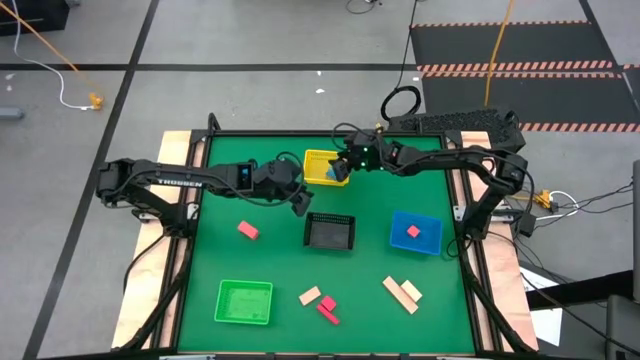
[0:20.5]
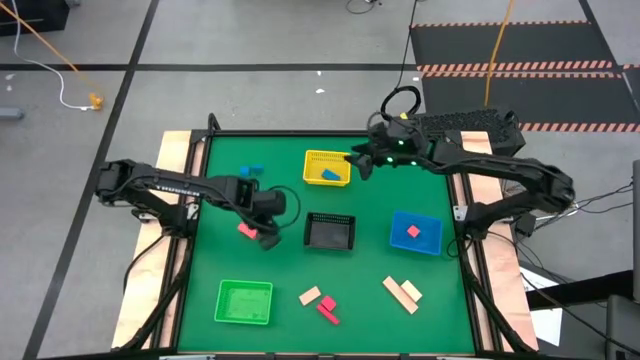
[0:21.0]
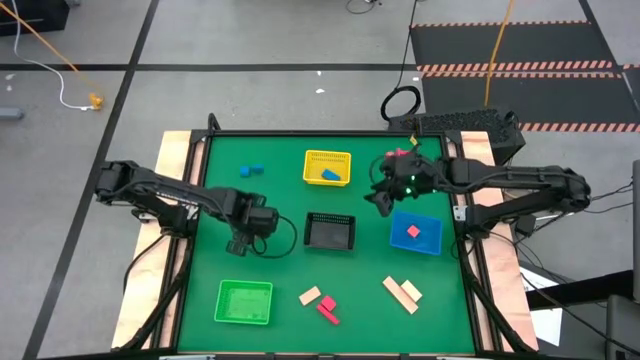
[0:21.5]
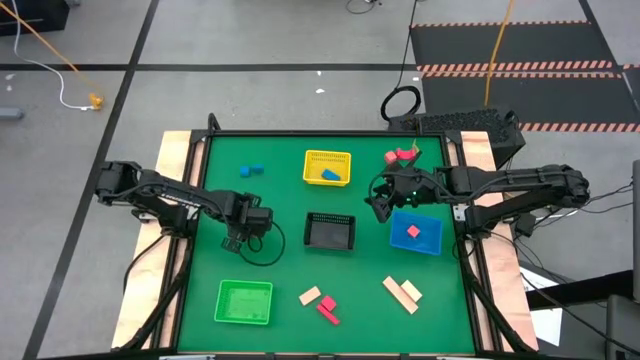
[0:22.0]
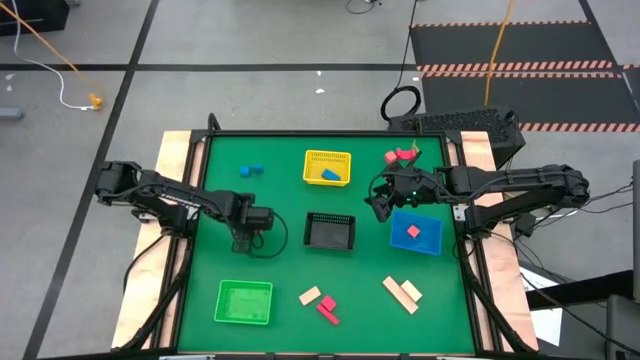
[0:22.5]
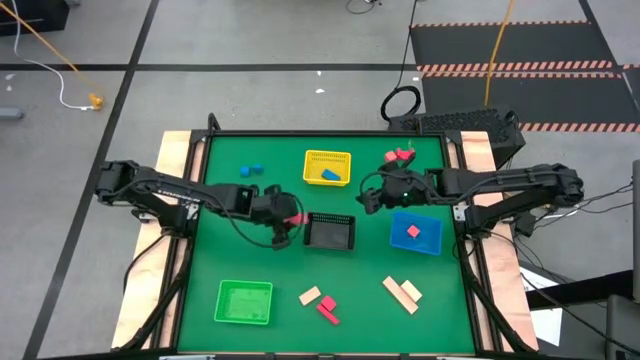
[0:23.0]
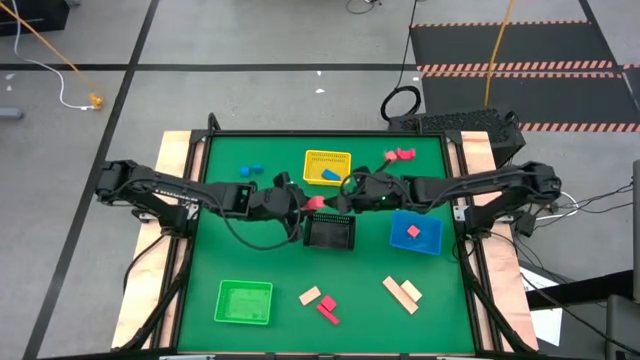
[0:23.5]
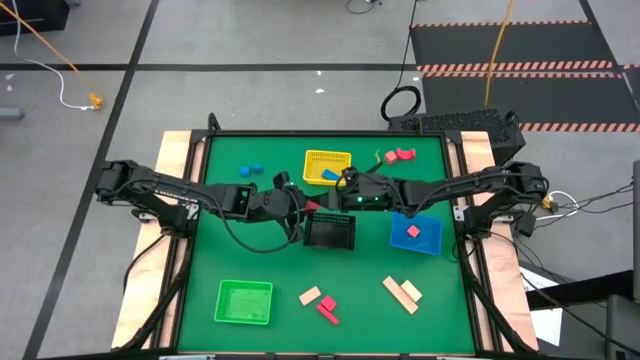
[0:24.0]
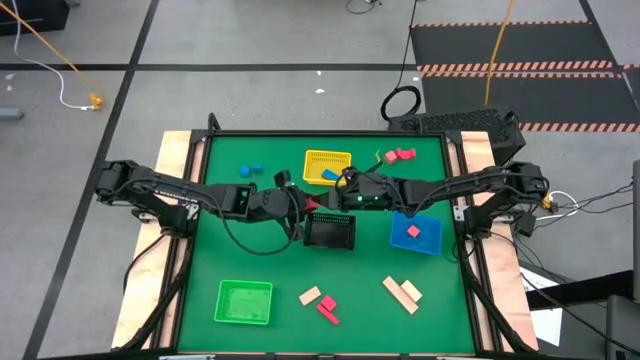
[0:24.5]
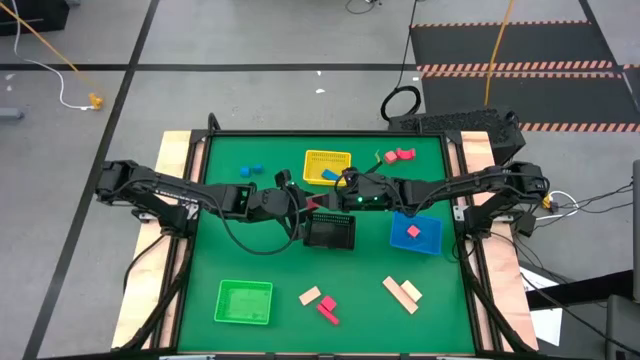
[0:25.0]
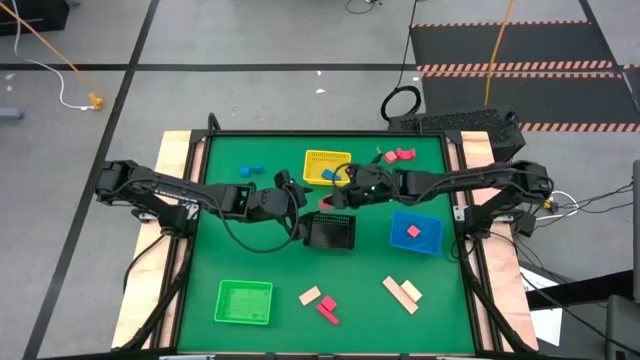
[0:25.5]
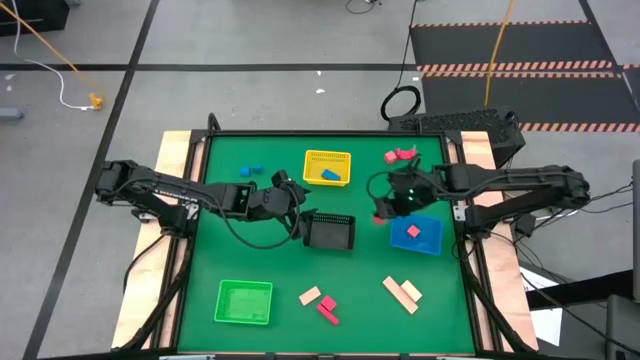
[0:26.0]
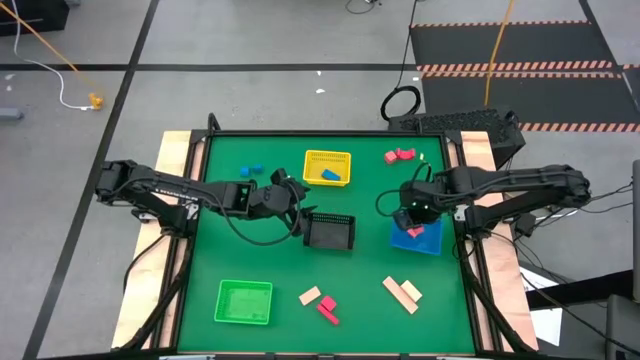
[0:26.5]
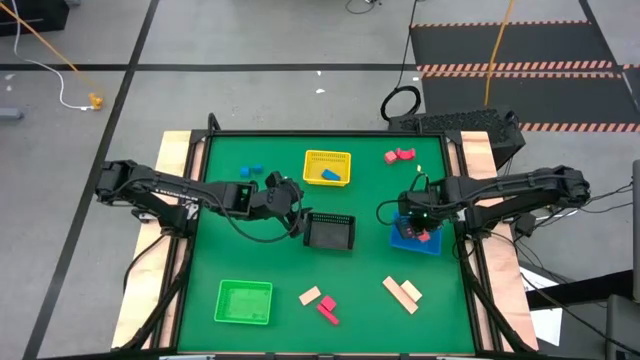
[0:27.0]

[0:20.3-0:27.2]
Task: Sort & place blocks by color
Put the bottom orange block into the blue bin

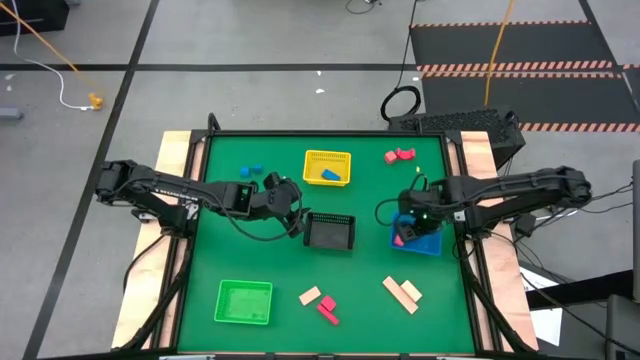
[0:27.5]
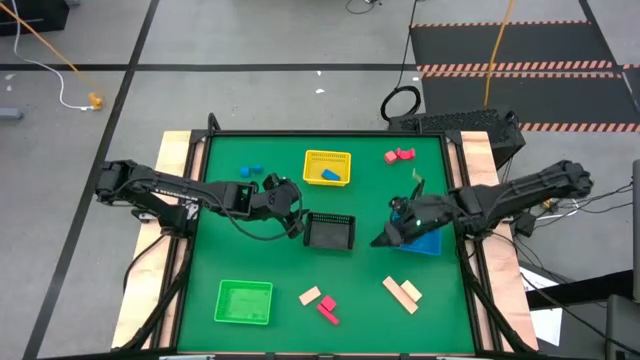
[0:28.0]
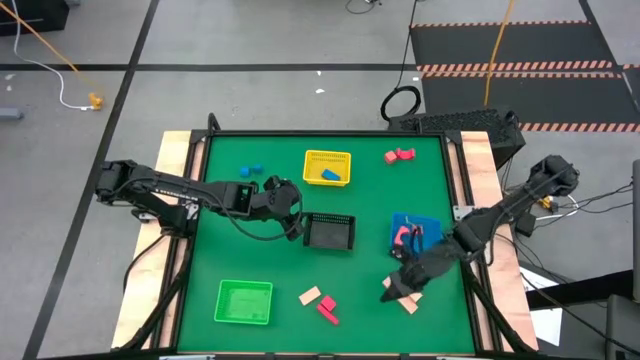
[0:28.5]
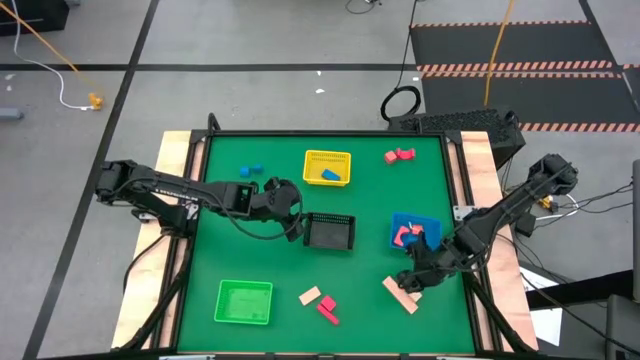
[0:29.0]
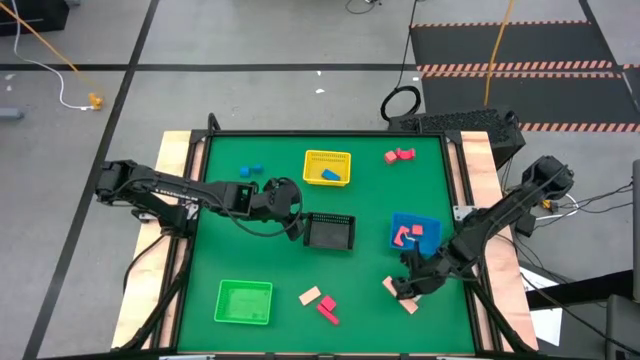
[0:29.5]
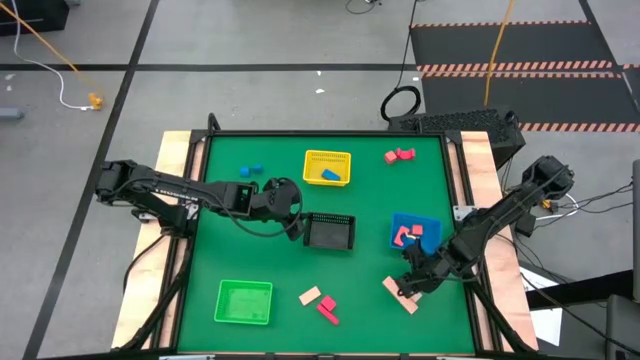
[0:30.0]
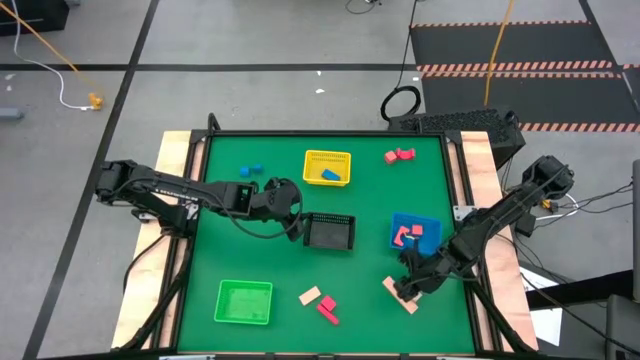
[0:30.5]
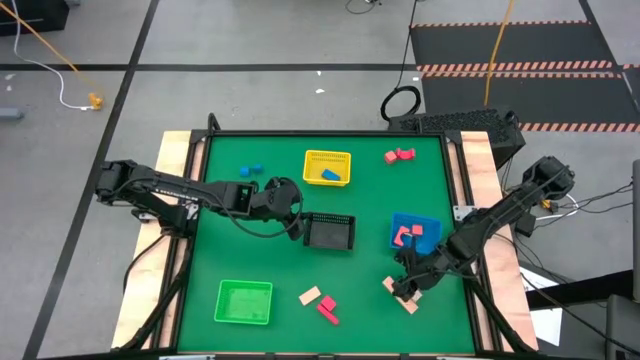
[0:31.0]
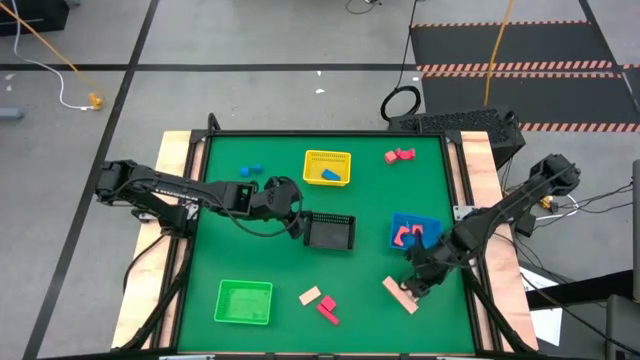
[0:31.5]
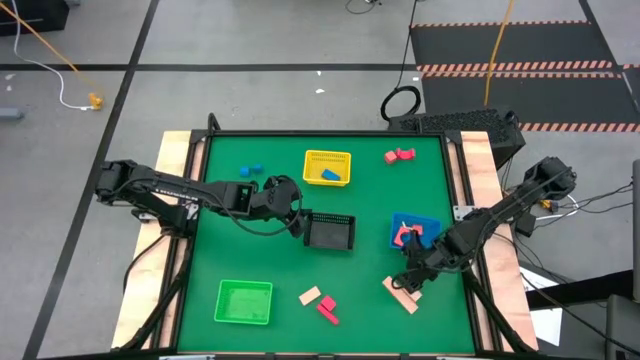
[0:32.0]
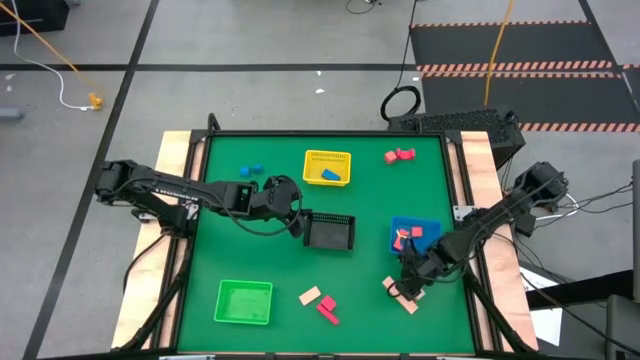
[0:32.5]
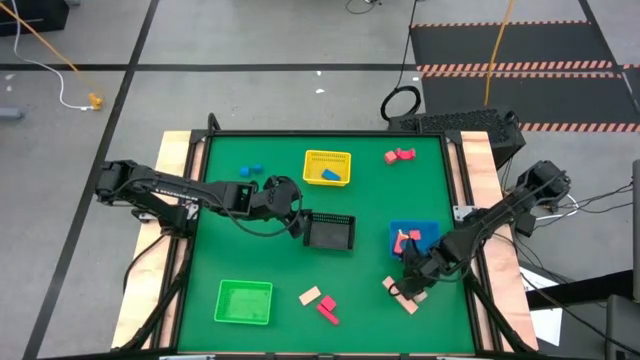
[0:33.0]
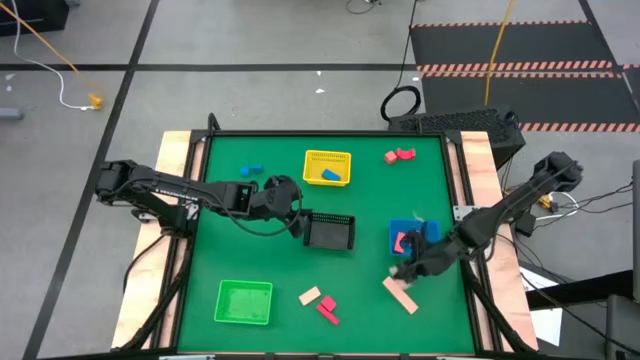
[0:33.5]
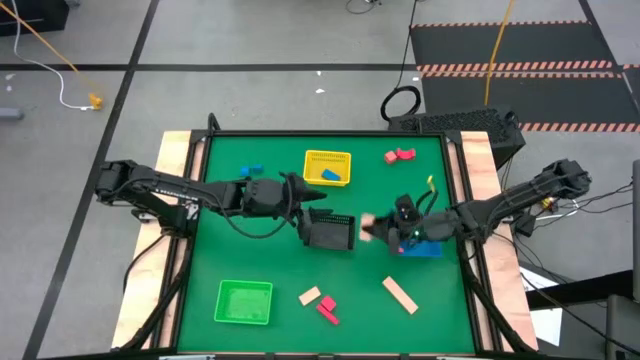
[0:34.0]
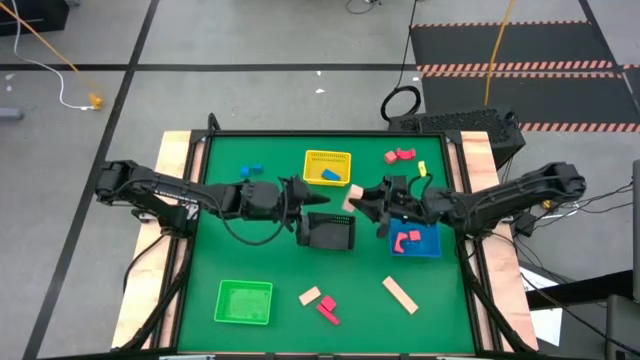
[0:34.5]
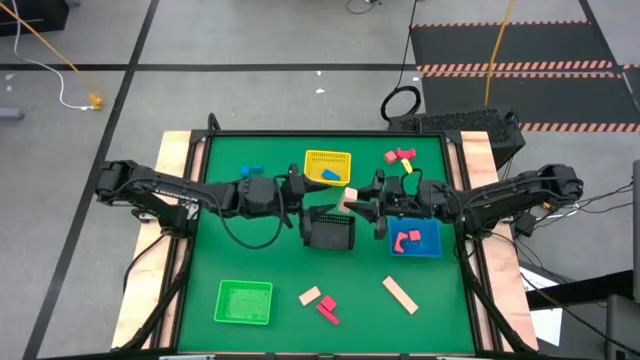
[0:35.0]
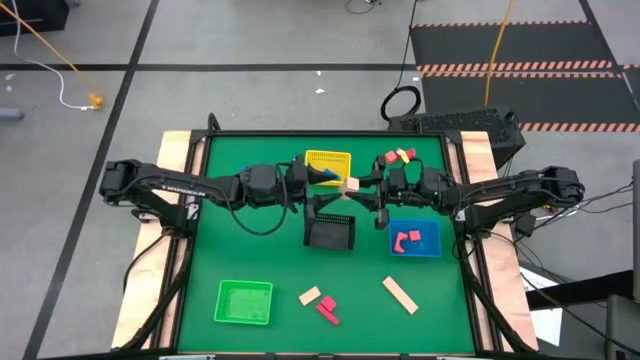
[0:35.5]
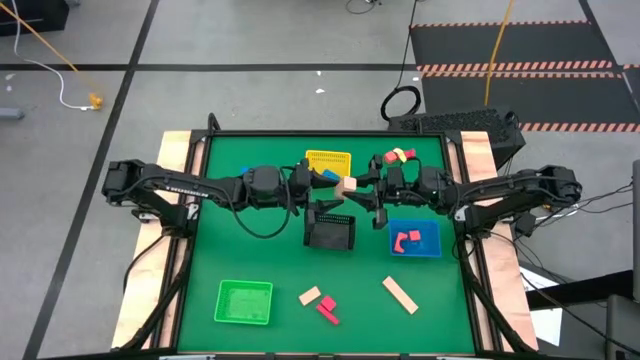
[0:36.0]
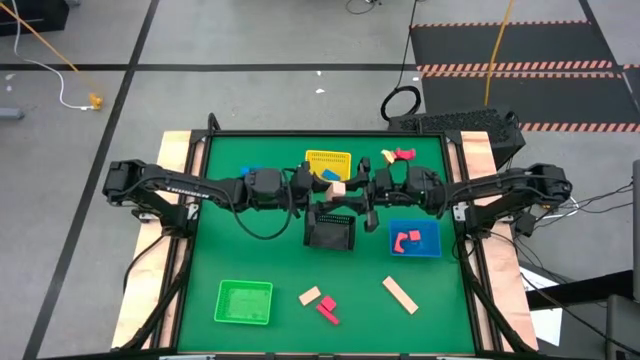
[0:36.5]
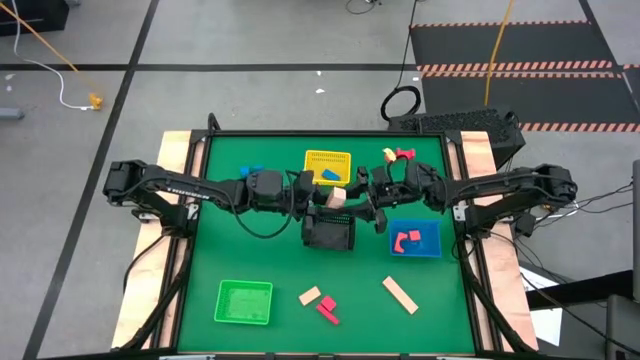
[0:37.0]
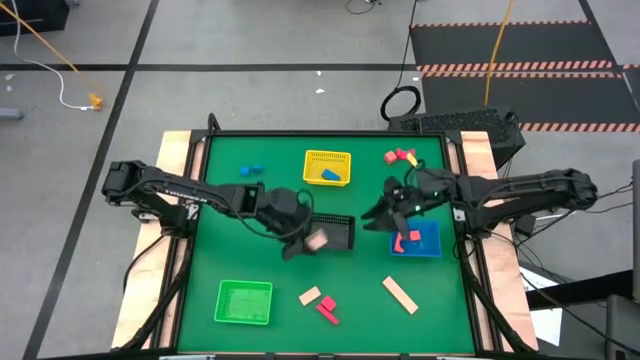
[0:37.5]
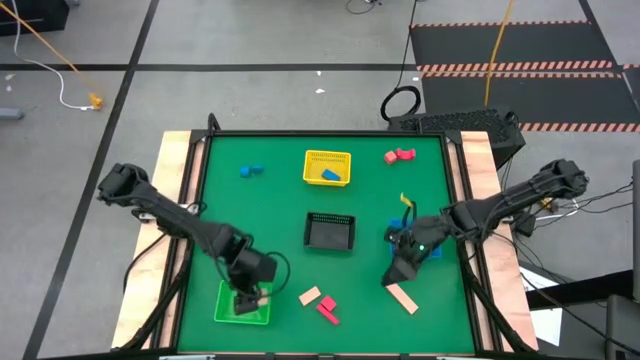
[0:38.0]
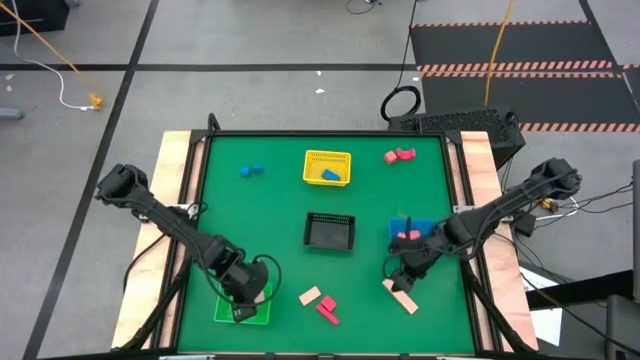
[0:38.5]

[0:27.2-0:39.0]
Put the right brown block into the green bin

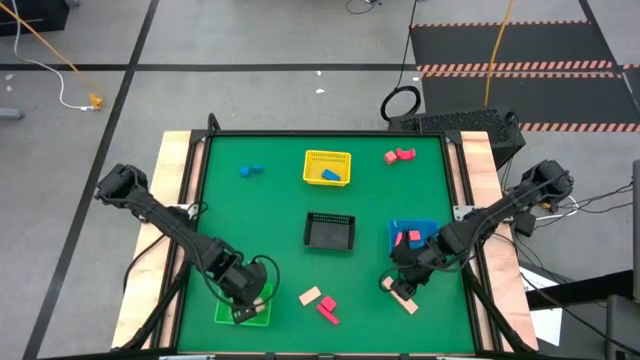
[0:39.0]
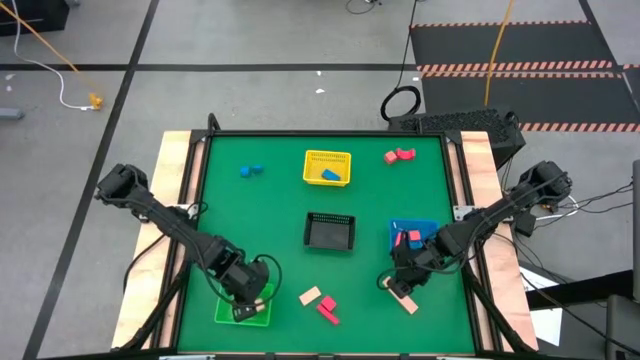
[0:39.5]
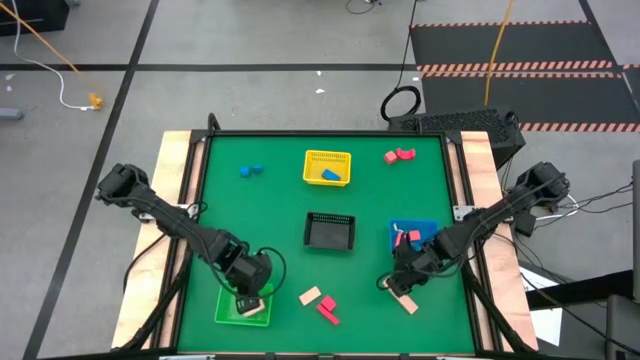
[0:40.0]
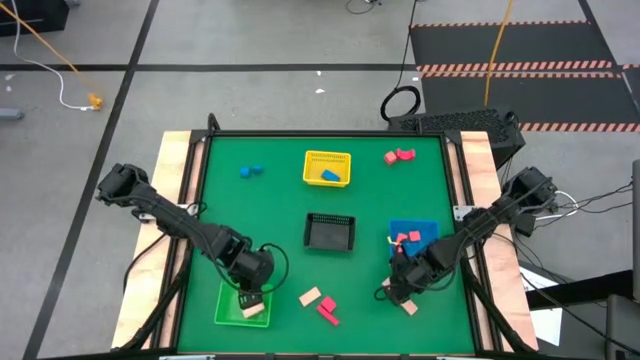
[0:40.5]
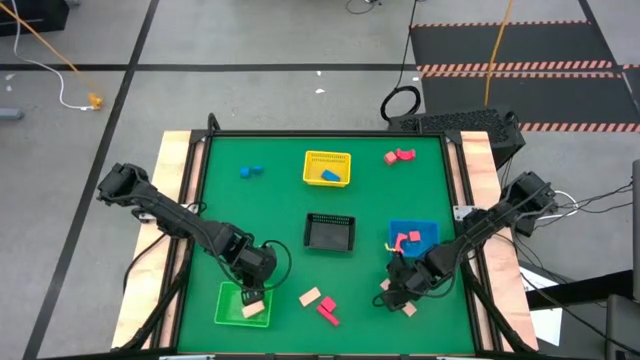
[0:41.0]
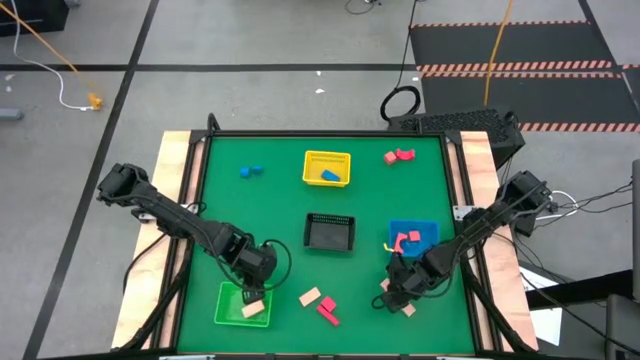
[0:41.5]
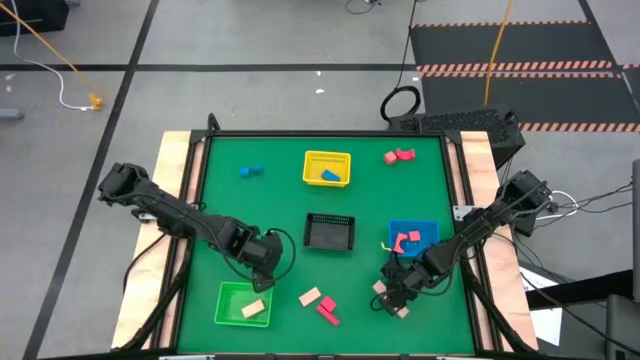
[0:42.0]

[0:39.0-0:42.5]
Put the right brown block into the green bin
